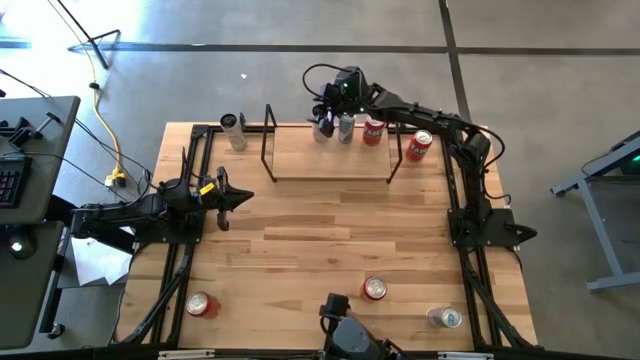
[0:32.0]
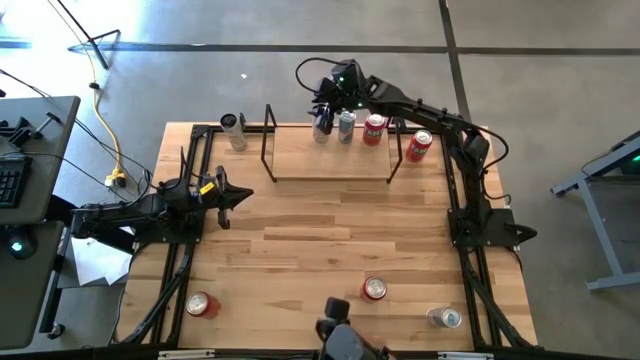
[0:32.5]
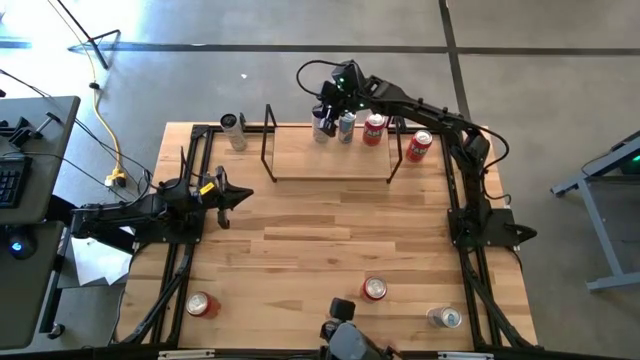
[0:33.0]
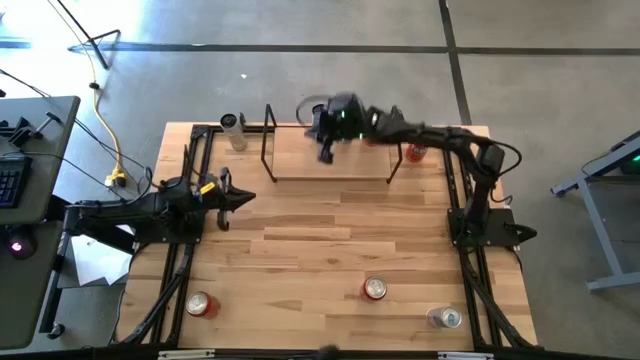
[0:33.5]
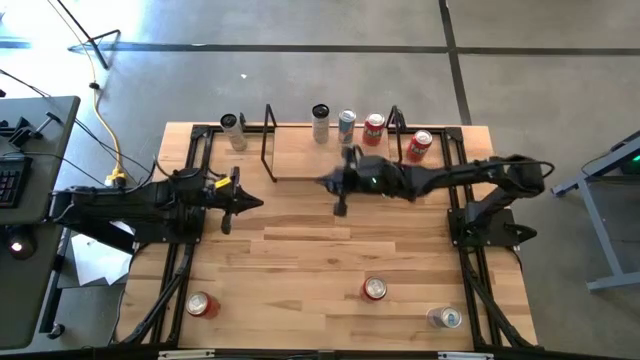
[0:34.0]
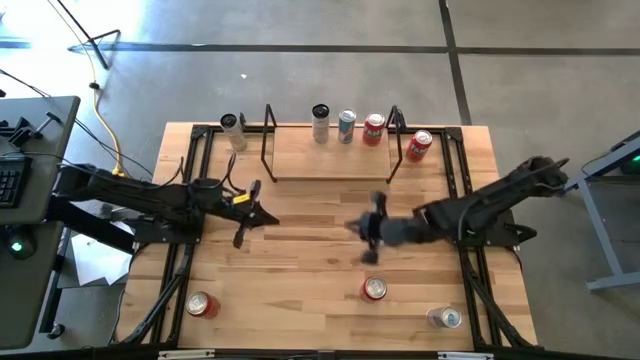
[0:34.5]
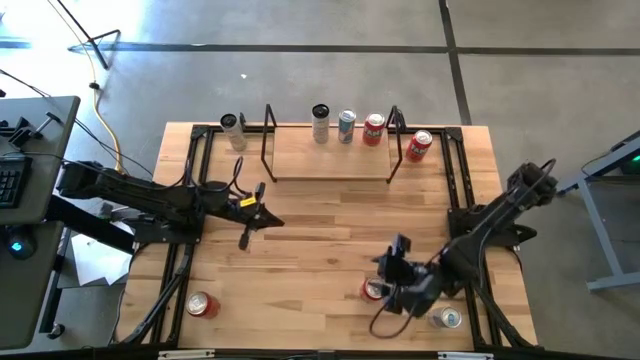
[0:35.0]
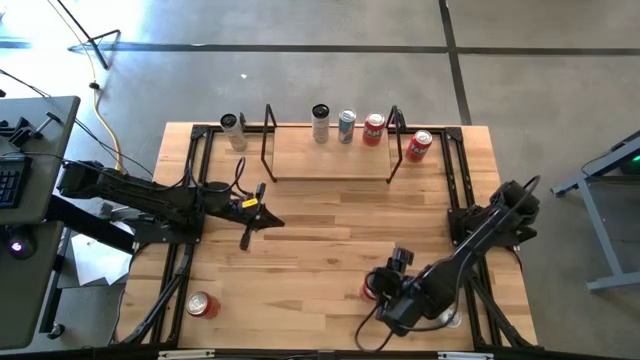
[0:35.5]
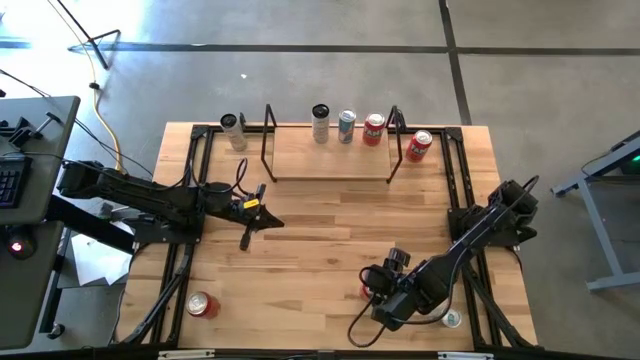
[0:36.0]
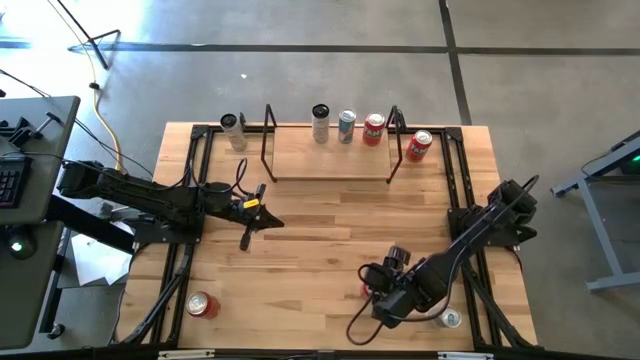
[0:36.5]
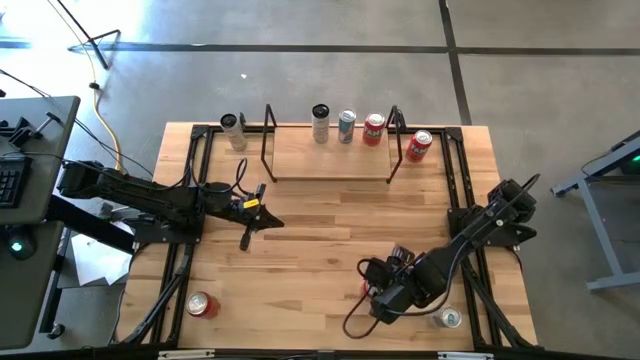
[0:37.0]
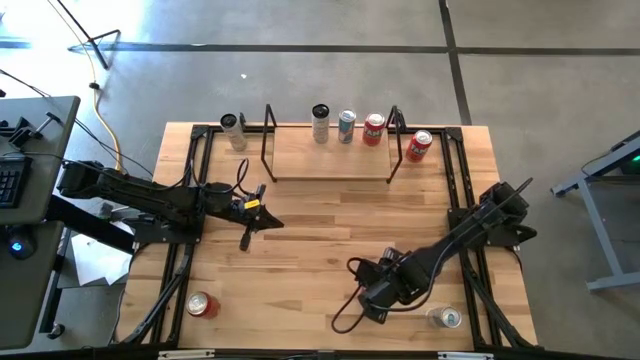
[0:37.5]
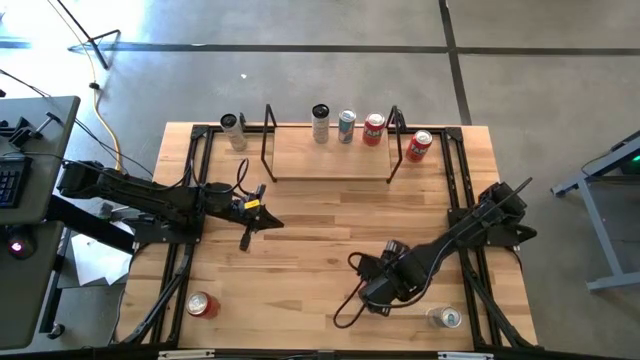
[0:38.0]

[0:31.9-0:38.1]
Task: Place canned beverage on shelf
Put the right red black soda can on the shelf

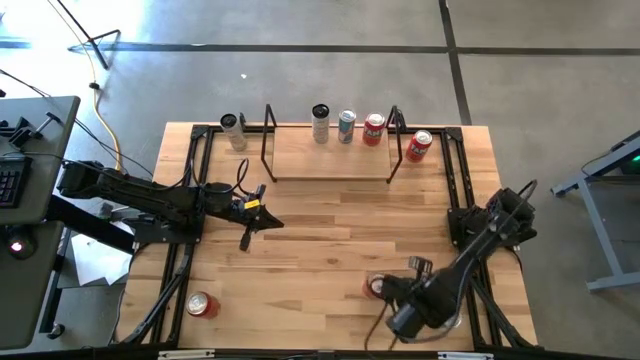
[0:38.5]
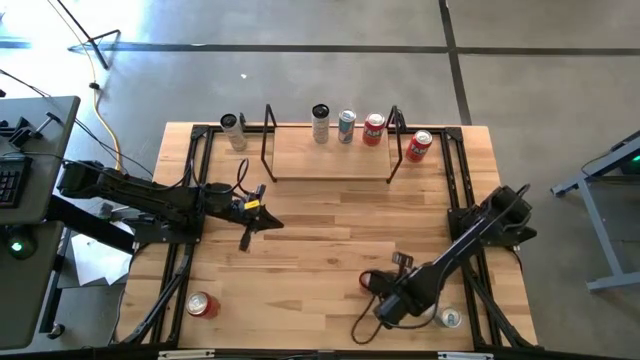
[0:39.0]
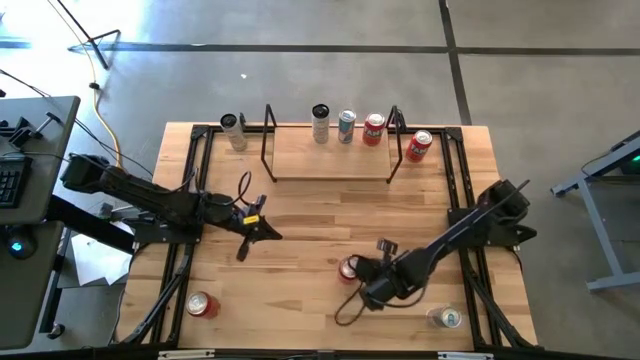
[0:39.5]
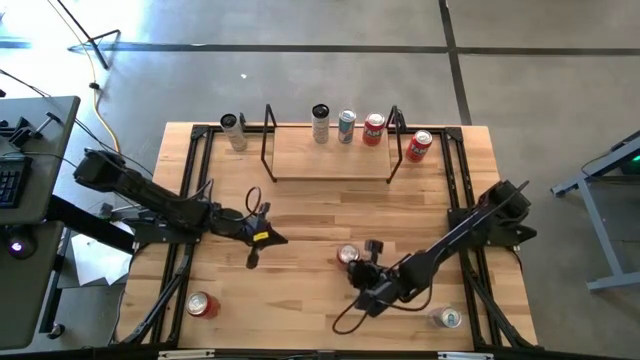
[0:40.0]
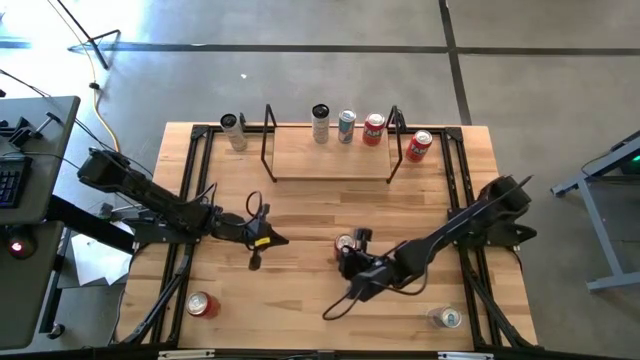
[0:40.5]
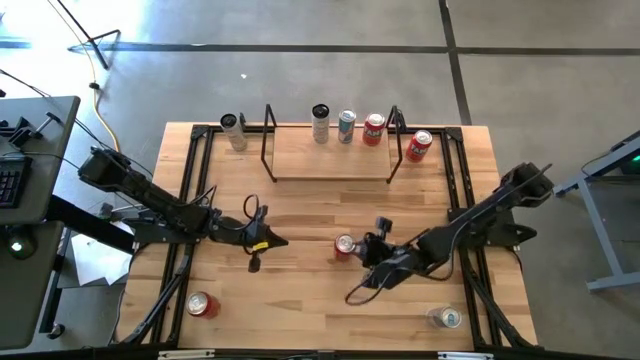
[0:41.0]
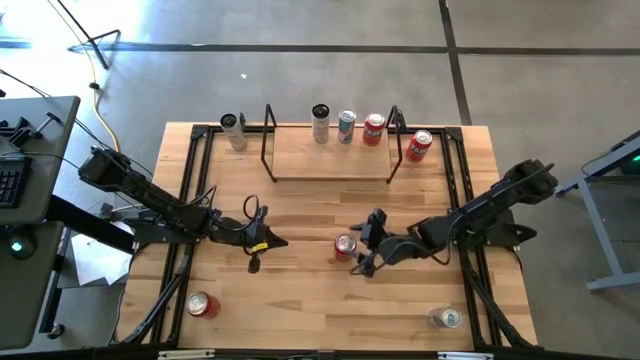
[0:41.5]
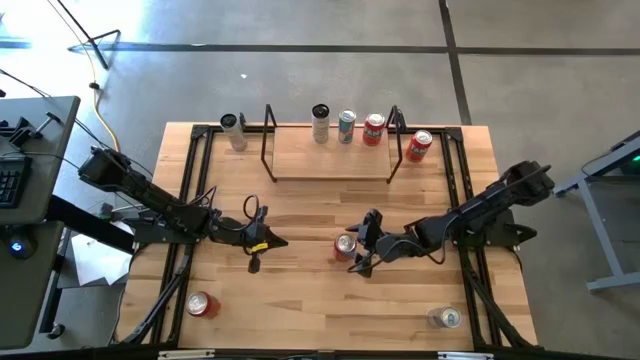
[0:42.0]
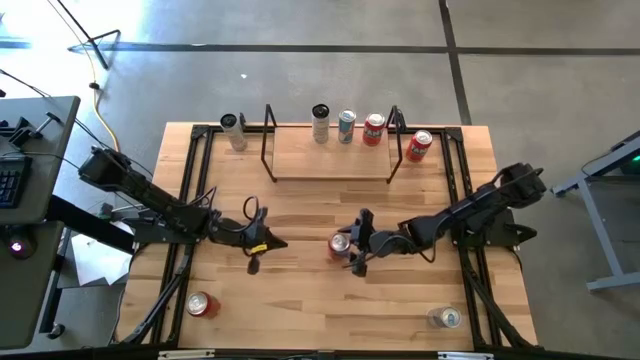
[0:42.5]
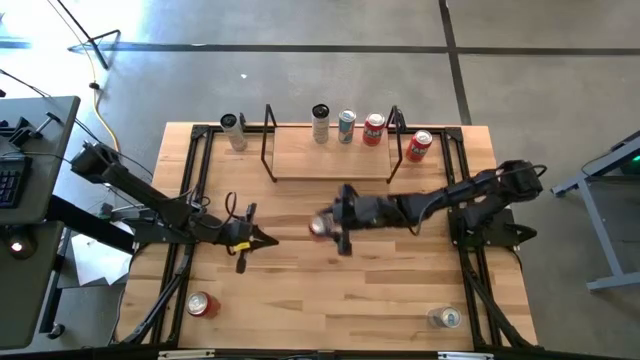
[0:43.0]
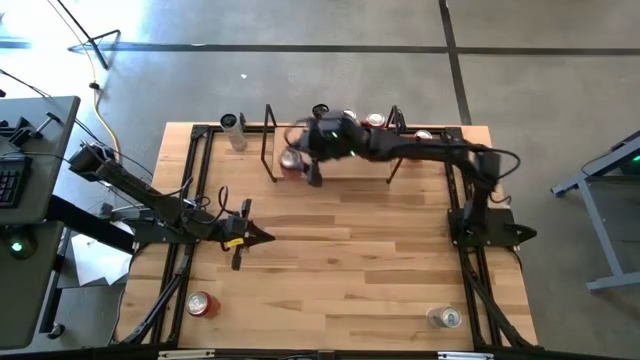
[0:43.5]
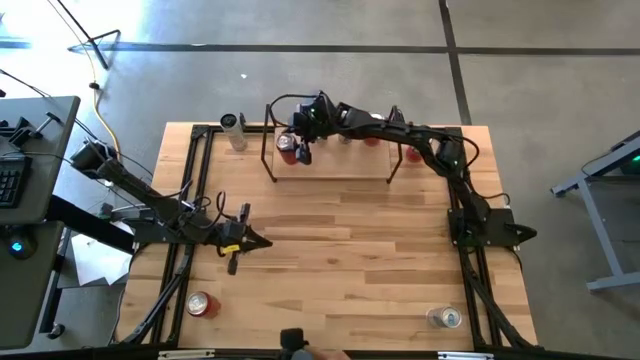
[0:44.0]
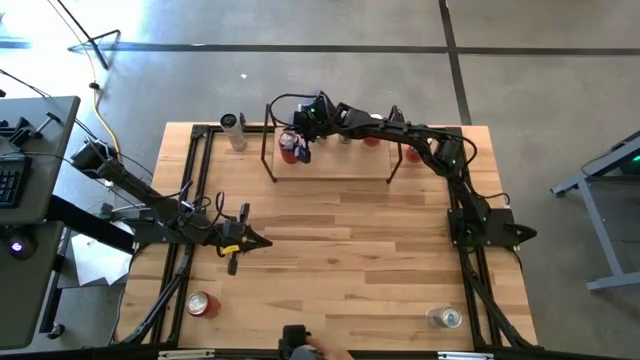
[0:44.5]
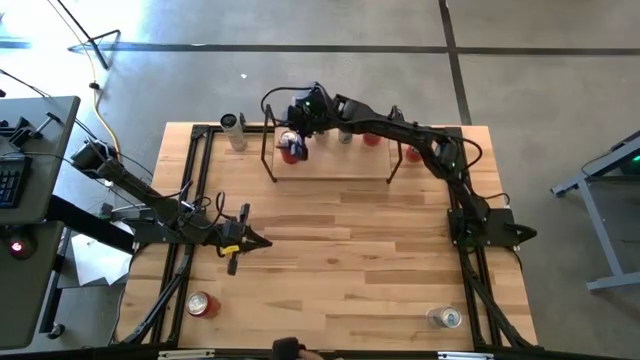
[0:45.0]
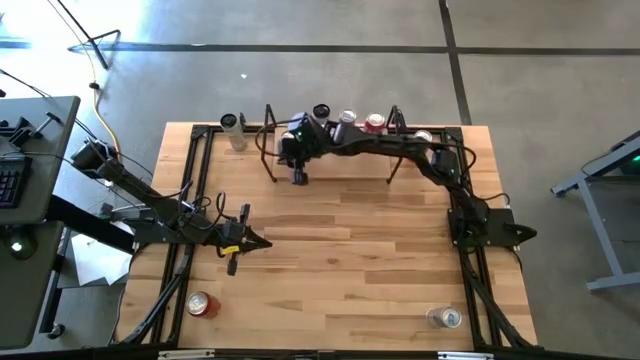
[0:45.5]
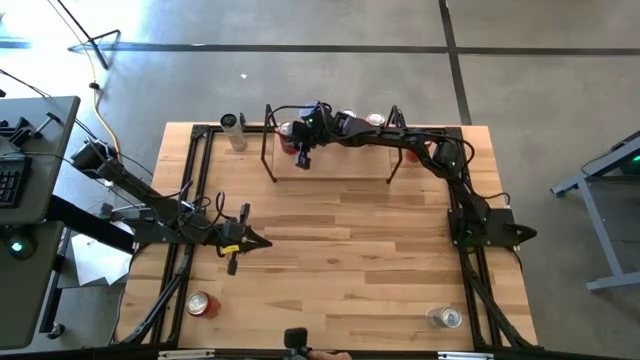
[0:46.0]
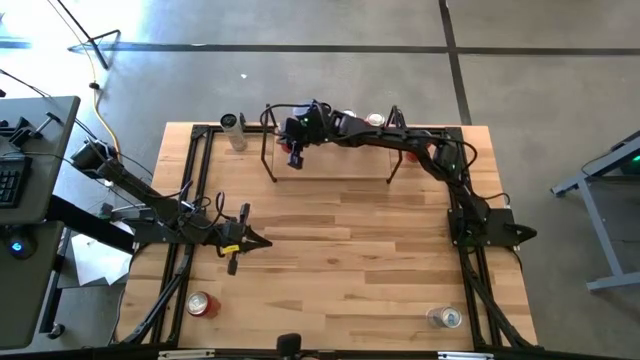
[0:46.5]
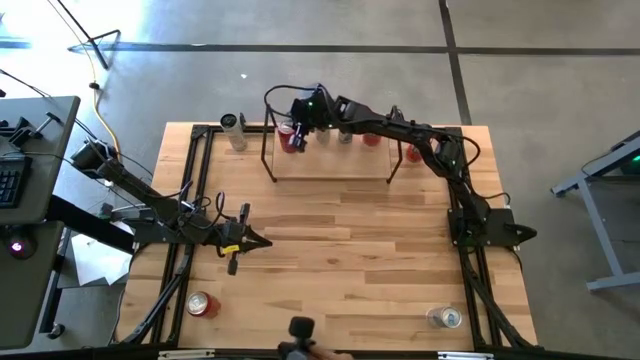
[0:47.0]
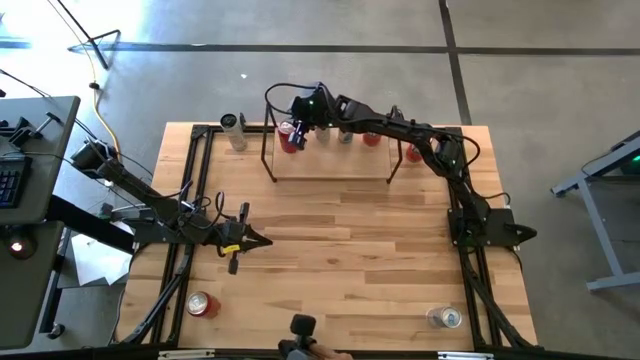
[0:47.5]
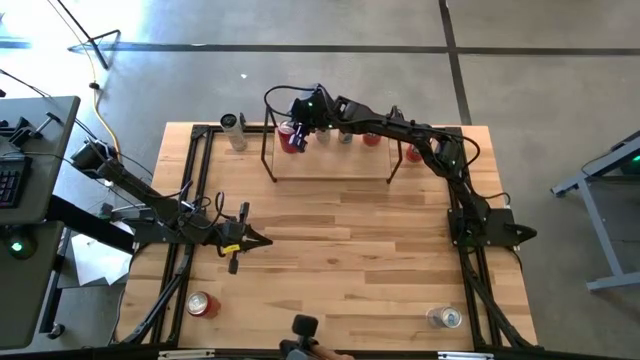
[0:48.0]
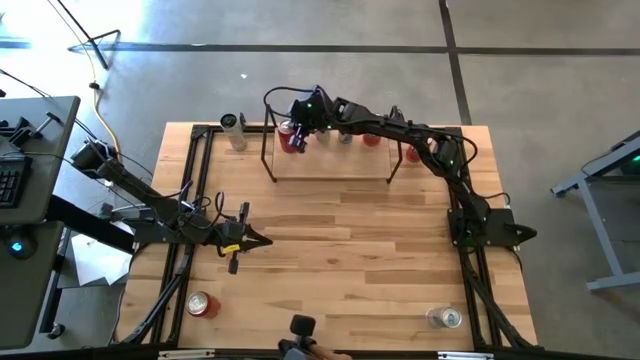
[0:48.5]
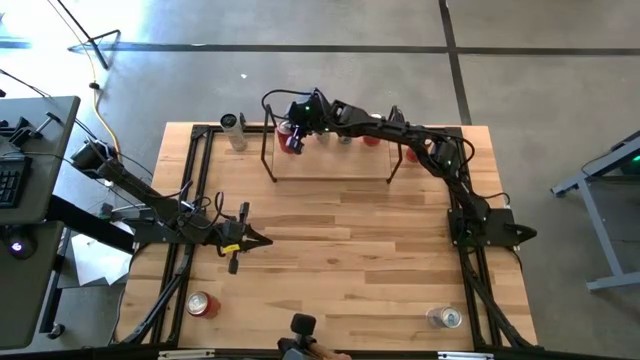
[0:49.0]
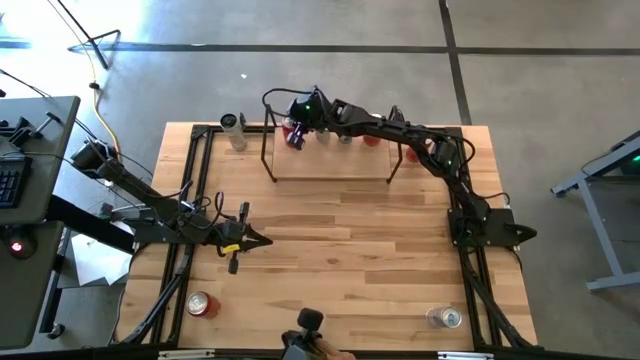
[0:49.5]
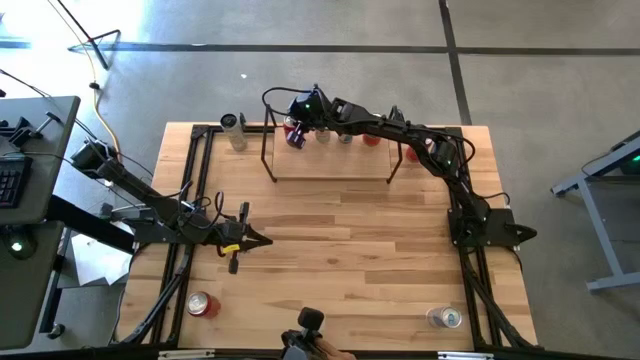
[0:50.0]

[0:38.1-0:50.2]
Put the right red black soda can on the shelf

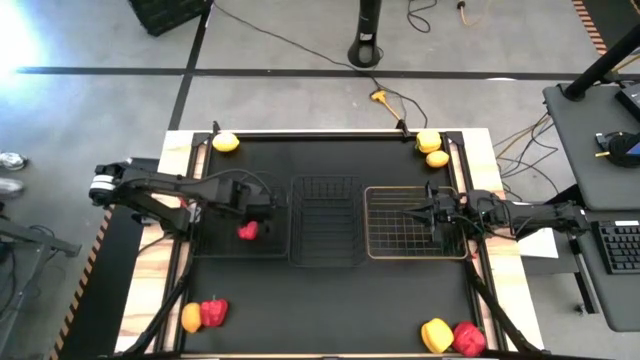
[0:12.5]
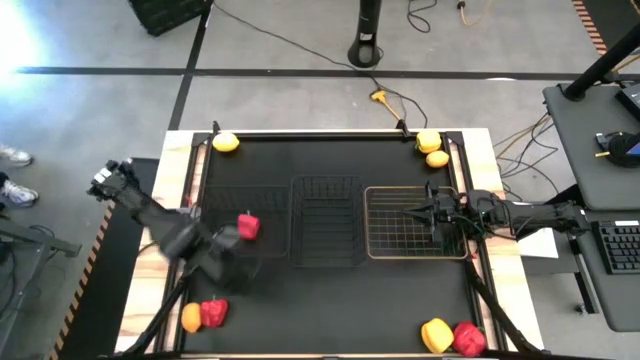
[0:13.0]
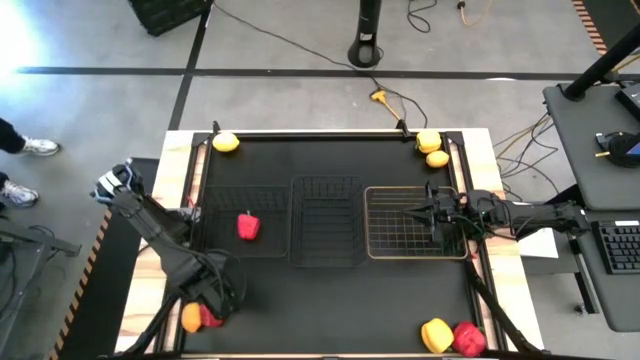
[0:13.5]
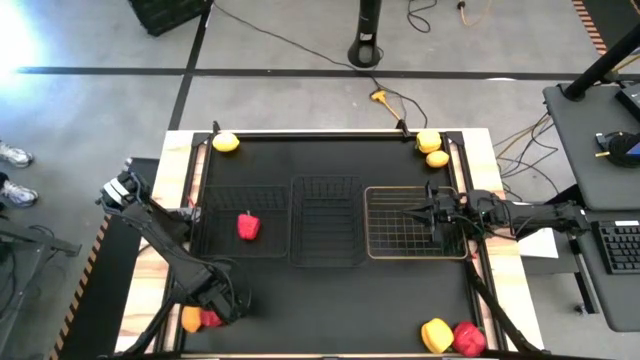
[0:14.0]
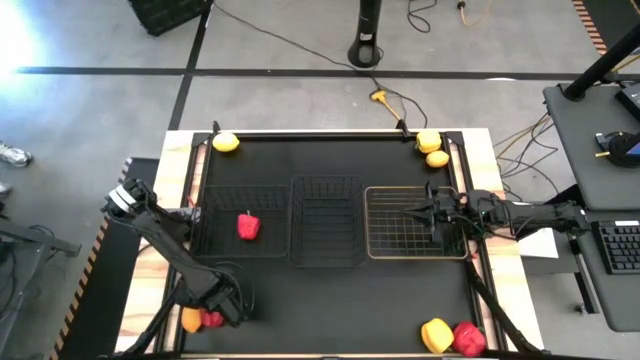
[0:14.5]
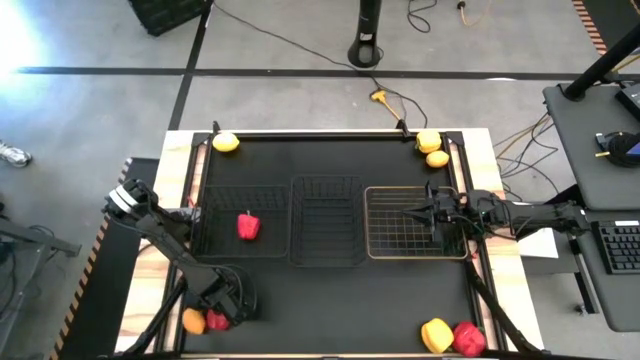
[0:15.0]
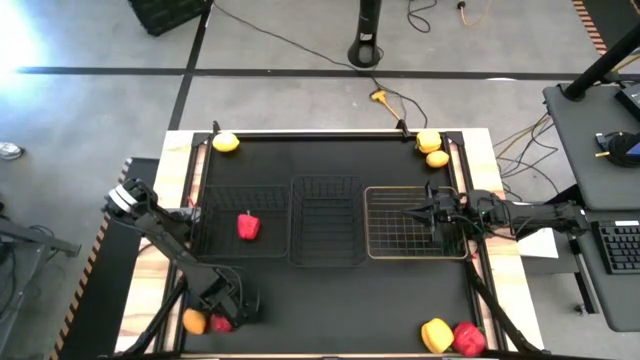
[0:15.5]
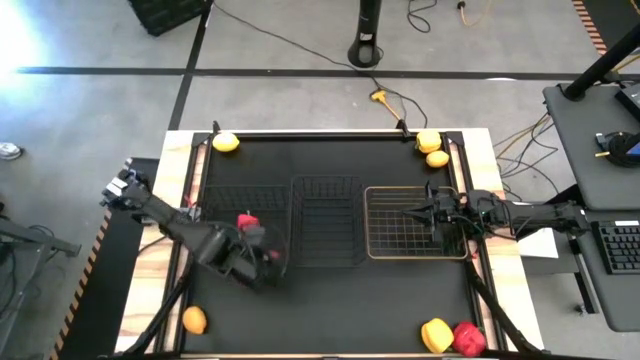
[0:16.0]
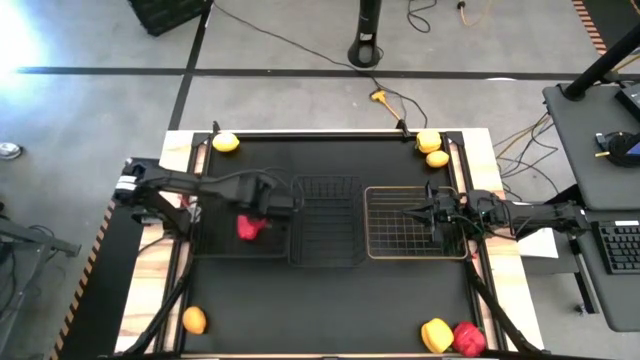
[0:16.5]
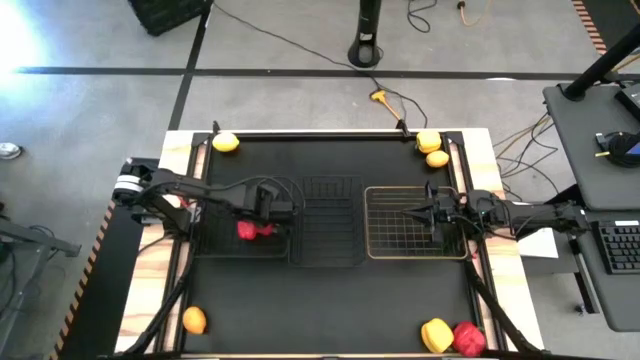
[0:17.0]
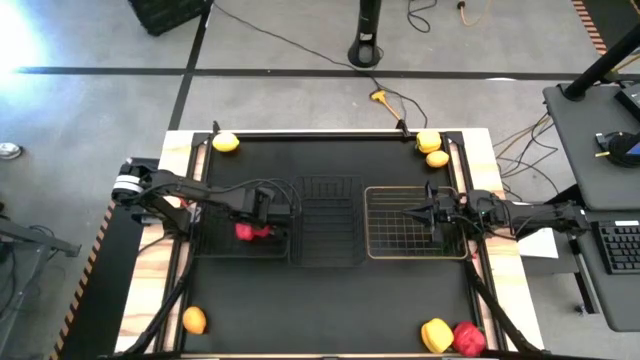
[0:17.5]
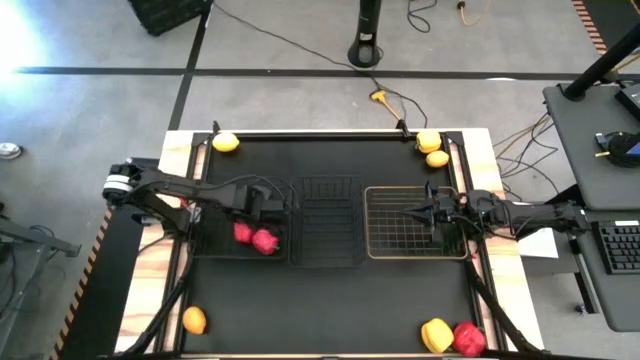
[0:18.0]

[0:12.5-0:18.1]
Task: Sort produce into baskets
Put the left red bell pepper into the left black wire basket
